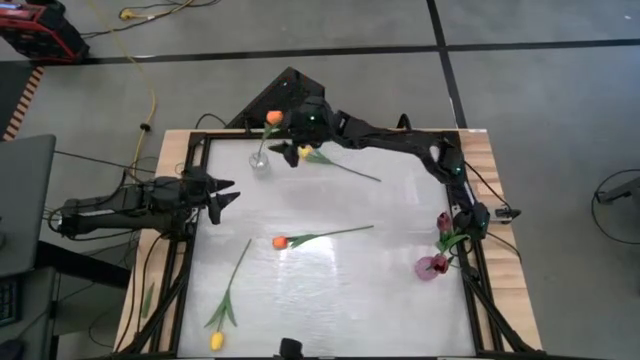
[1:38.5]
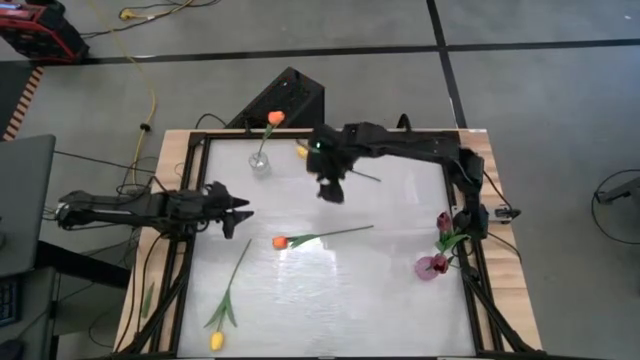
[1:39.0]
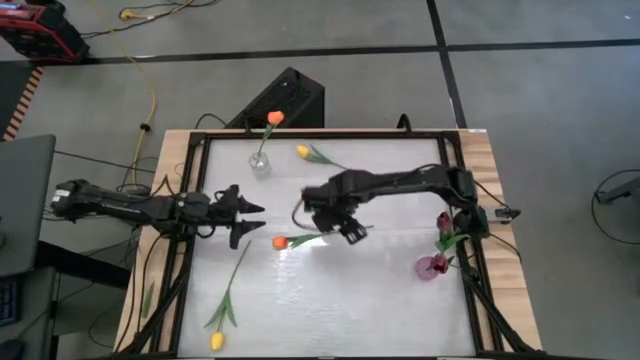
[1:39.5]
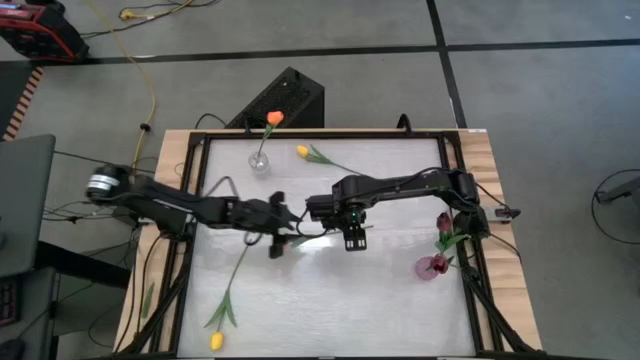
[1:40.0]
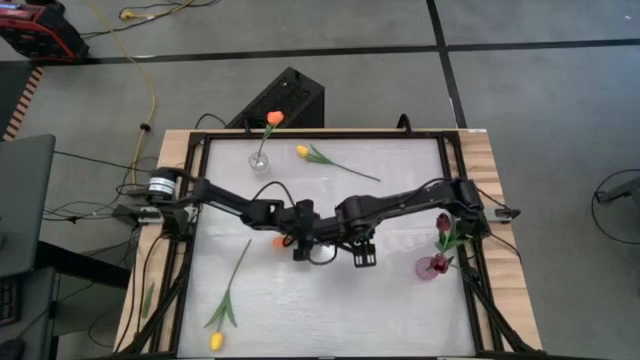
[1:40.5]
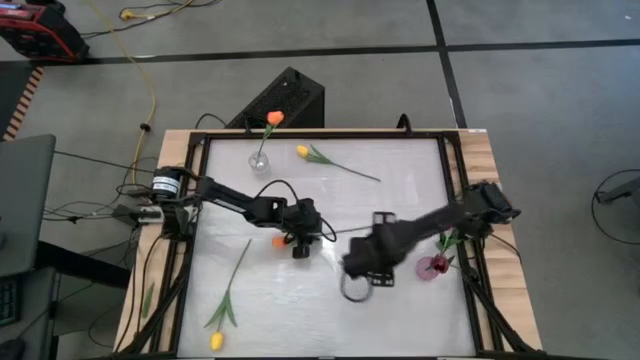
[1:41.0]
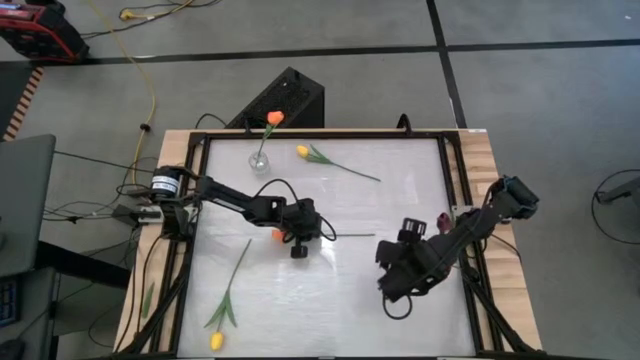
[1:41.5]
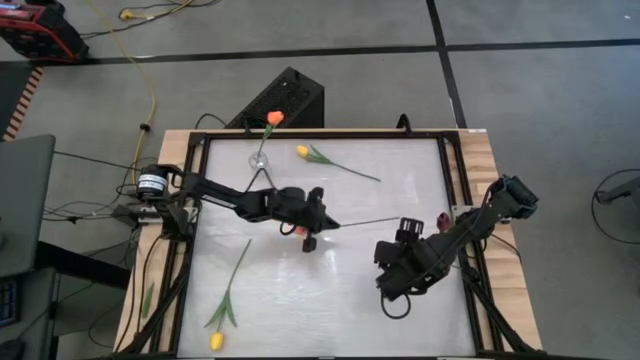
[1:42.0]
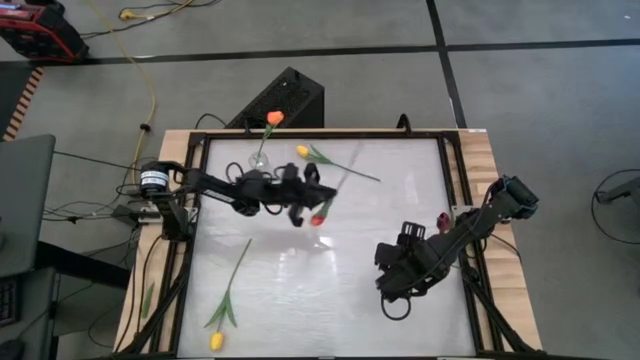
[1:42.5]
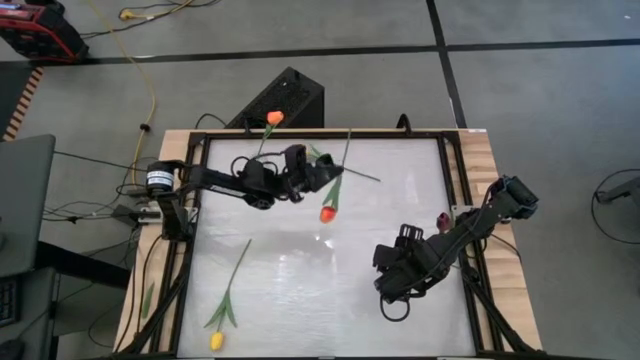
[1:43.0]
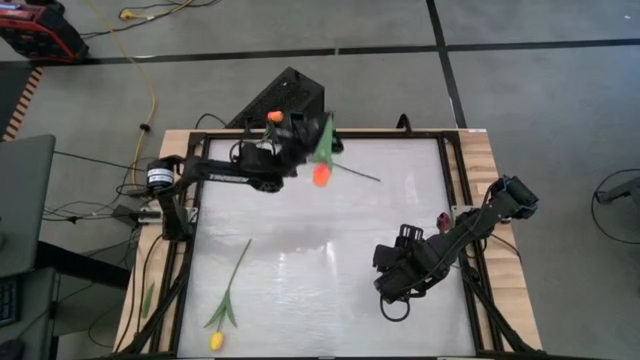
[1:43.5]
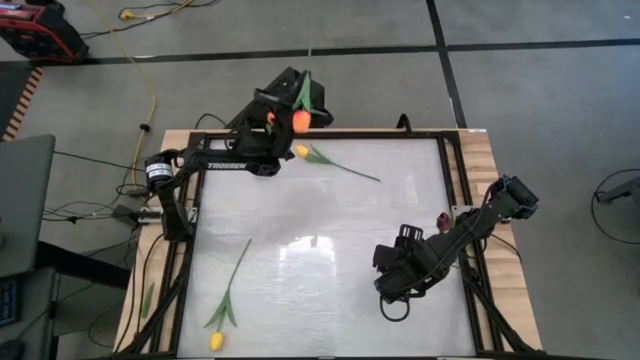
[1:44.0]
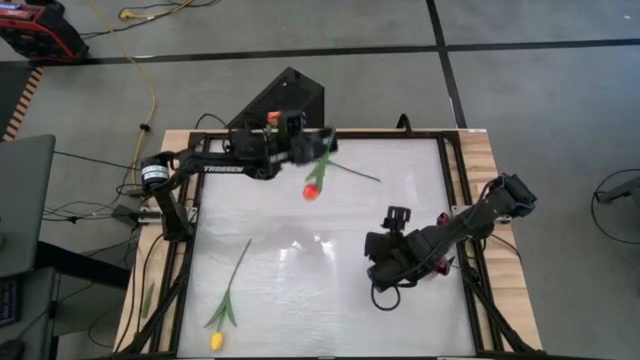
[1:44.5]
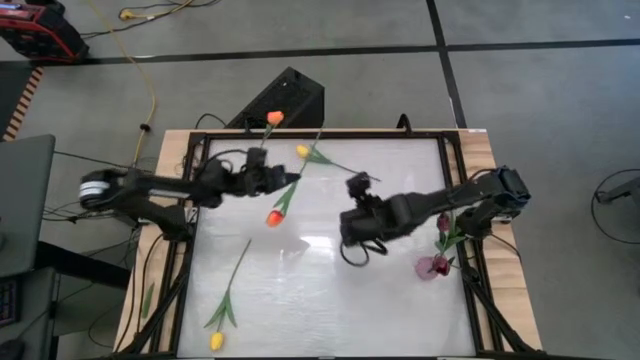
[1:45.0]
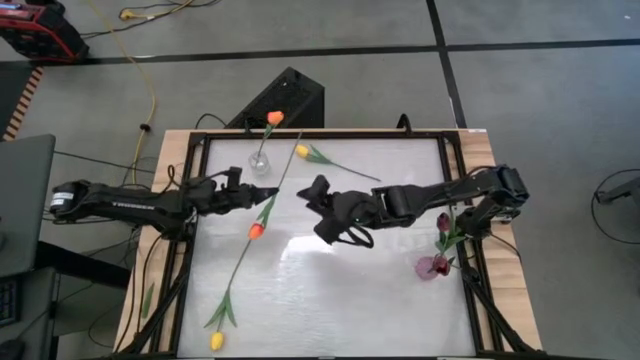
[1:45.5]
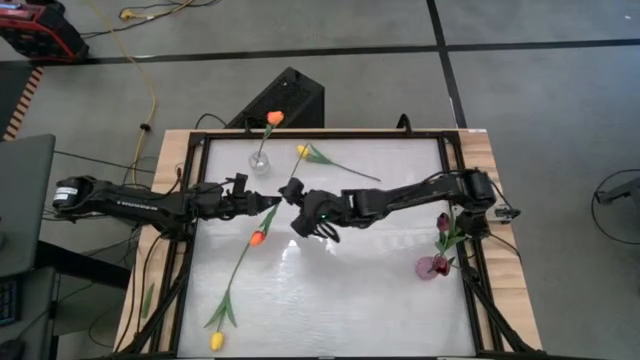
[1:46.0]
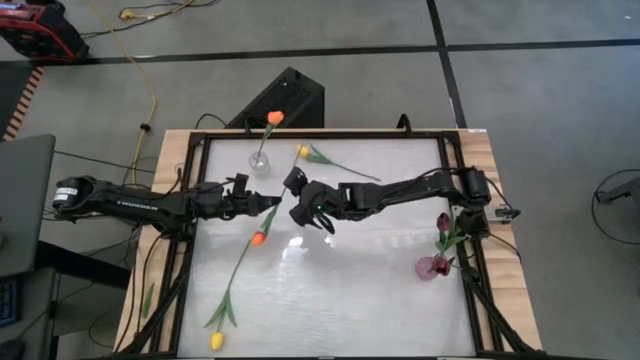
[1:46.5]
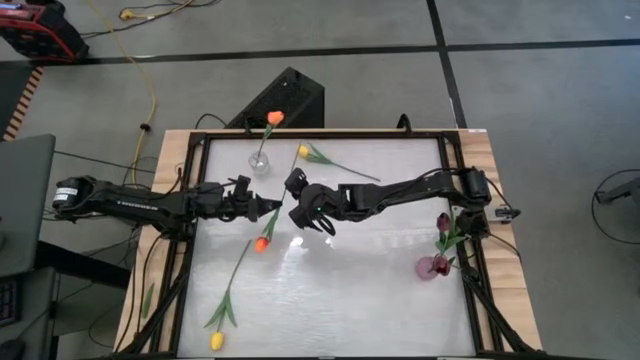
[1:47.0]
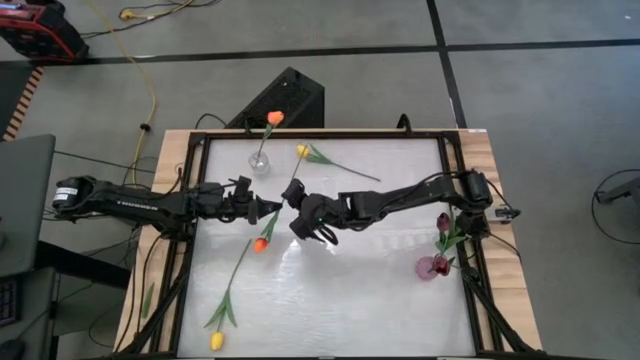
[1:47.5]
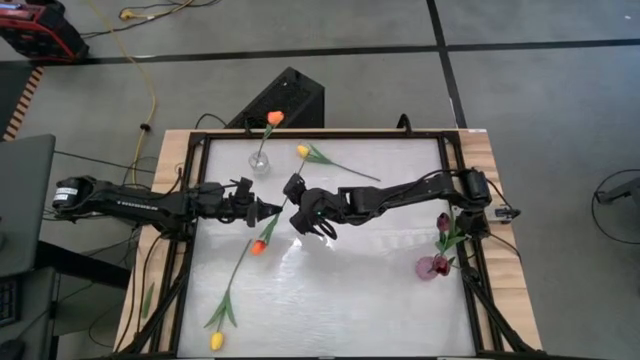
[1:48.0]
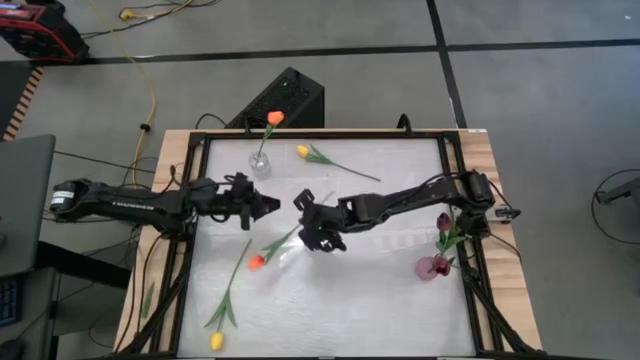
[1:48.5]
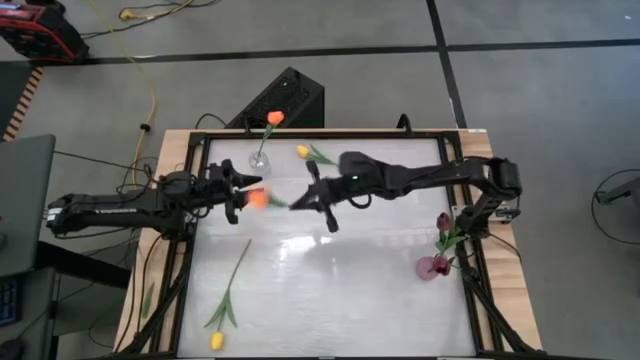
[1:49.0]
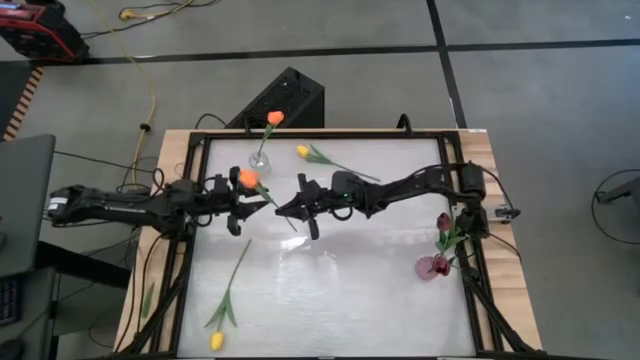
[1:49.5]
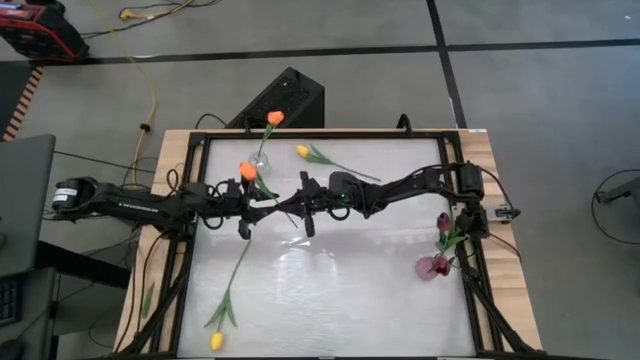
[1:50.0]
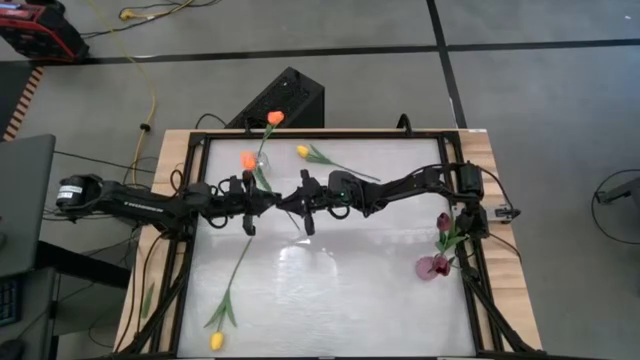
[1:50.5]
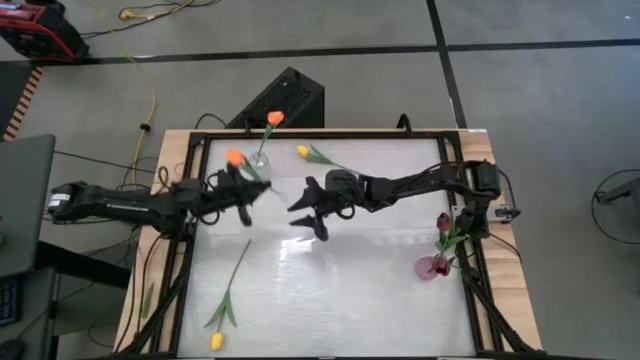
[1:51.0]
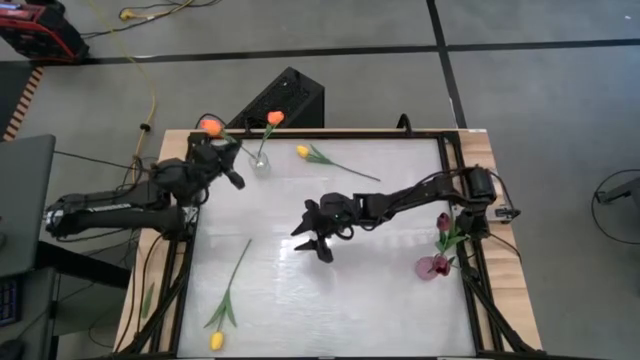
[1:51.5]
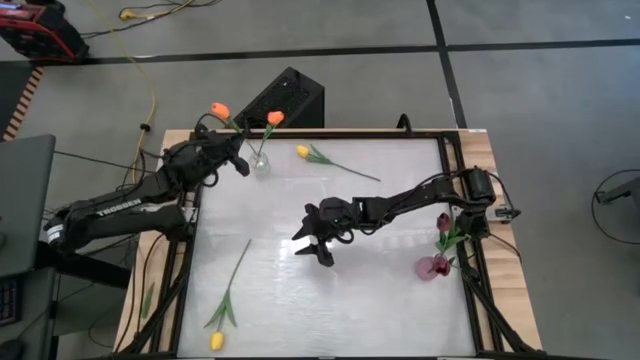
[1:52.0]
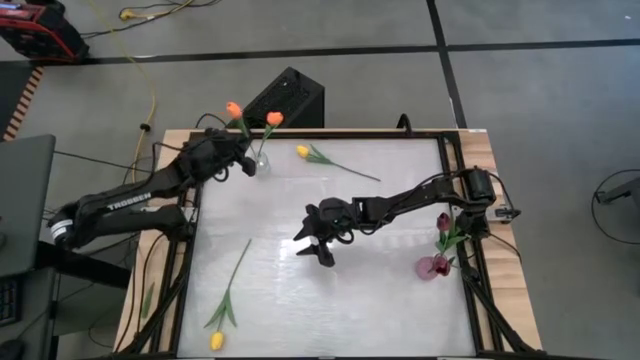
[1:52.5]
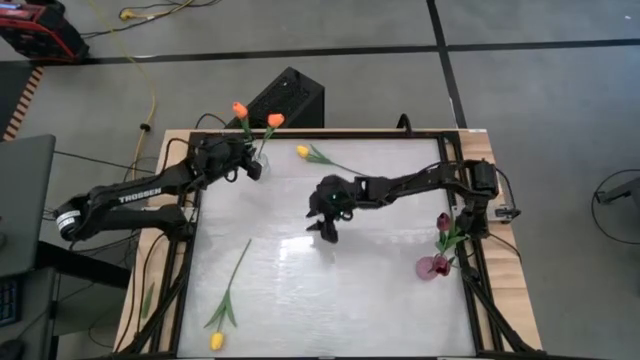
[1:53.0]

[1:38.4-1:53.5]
Task: Sort flowers into vase by color
Put the orange flower into the transparent vase

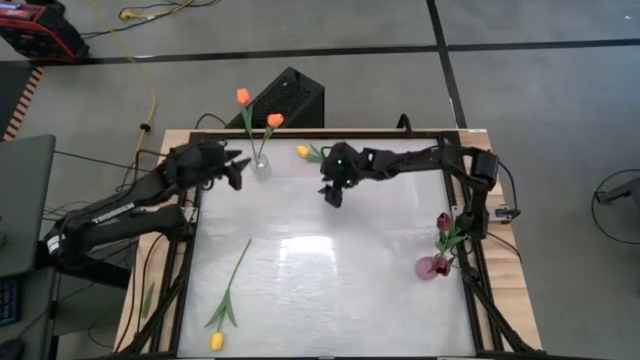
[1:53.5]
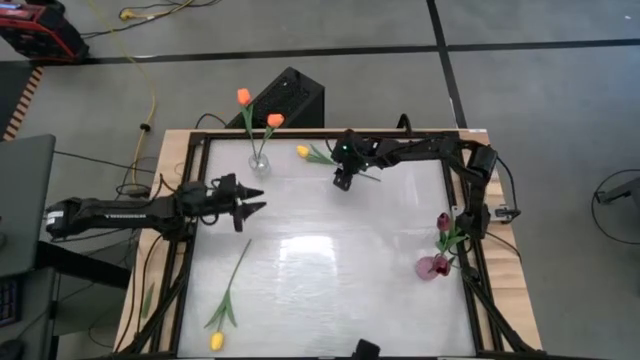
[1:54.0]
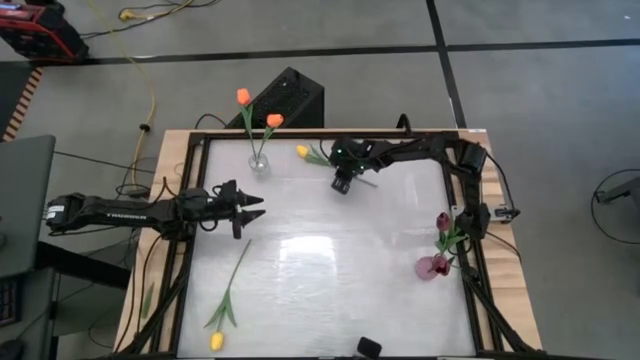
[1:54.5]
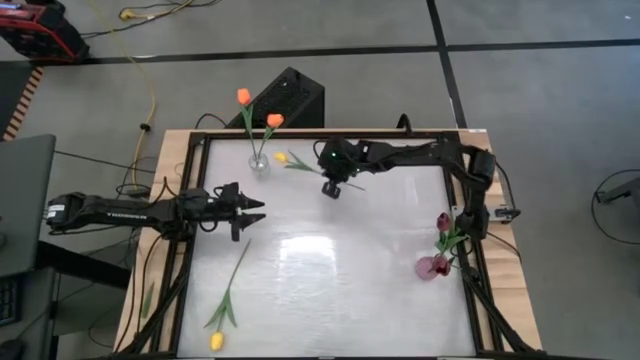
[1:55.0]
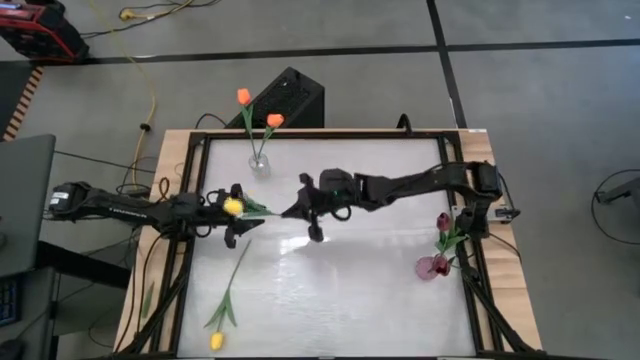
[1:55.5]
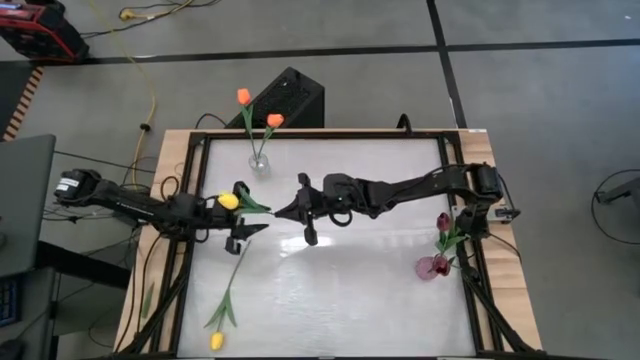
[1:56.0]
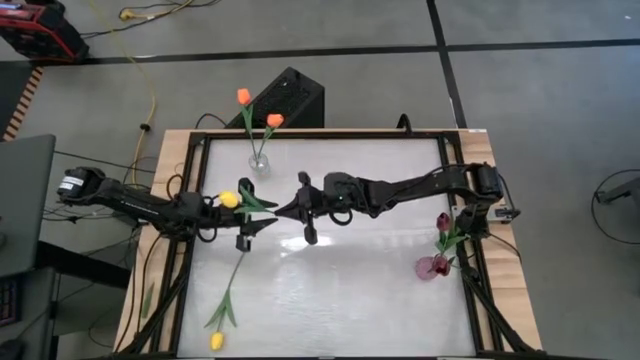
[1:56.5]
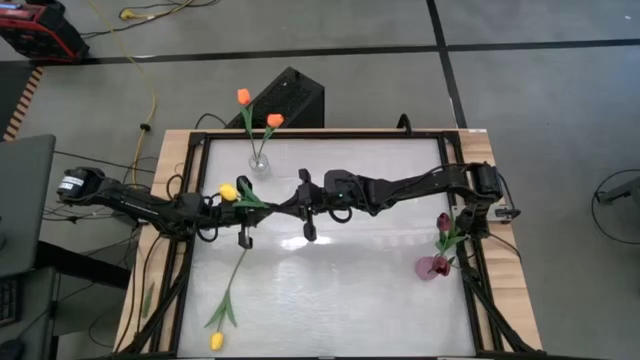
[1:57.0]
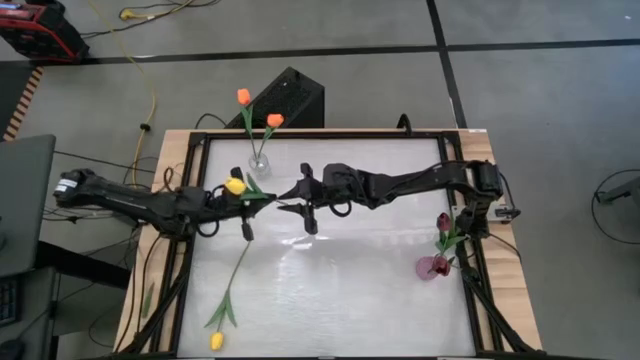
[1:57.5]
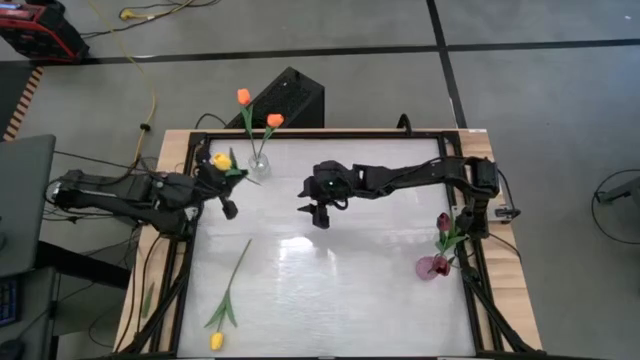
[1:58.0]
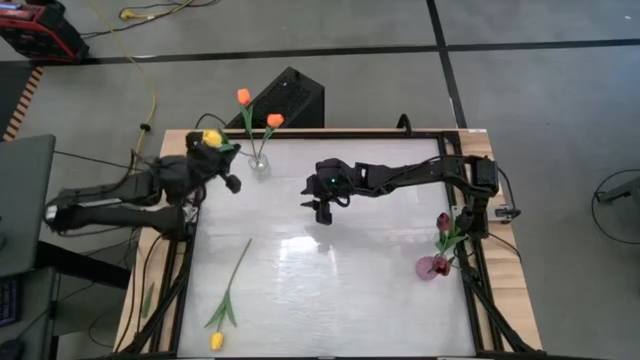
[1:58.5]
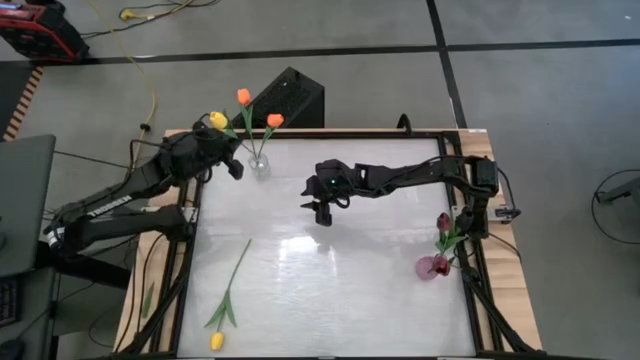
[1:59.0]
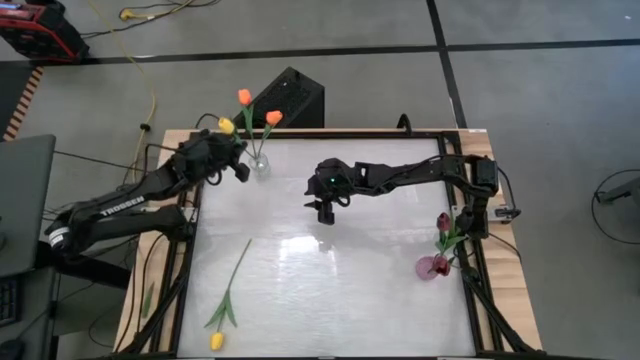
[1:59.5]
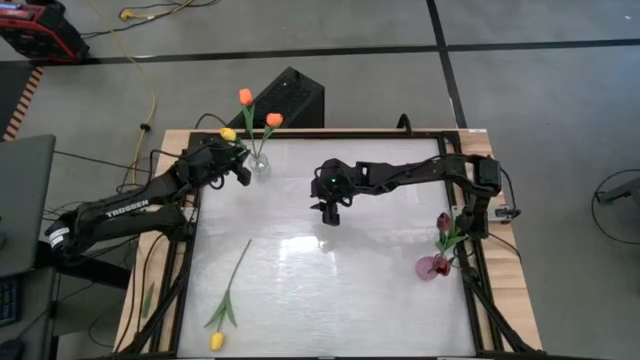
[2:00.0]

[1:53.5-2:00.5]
Put the top yellow flower into the transparent vase
